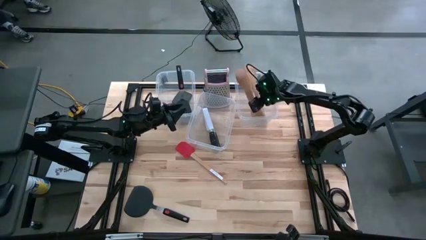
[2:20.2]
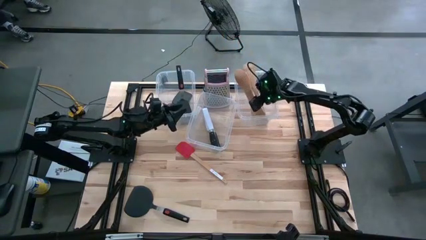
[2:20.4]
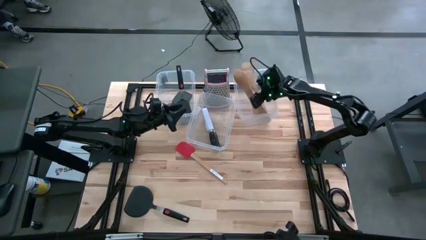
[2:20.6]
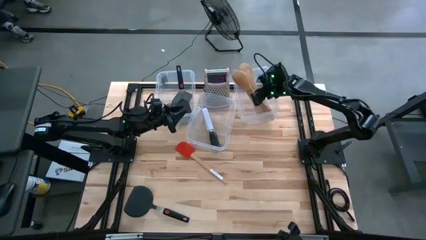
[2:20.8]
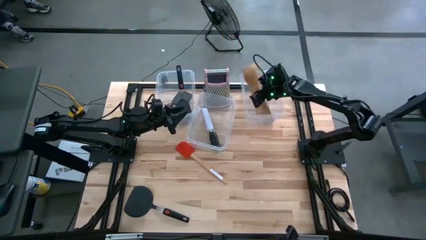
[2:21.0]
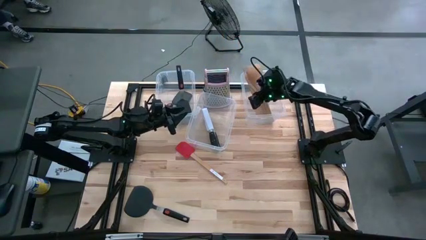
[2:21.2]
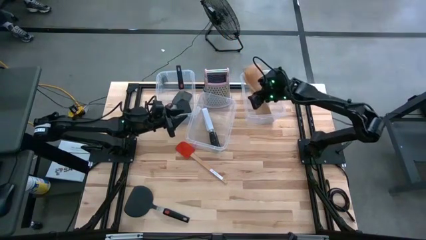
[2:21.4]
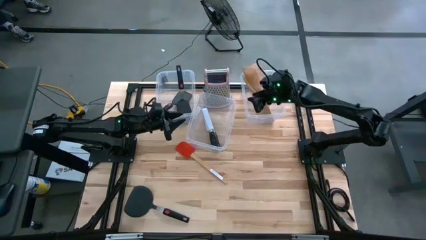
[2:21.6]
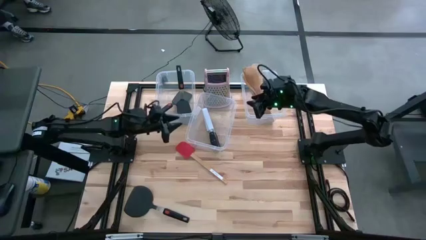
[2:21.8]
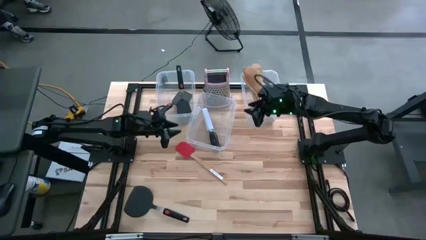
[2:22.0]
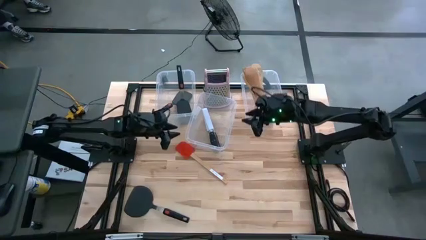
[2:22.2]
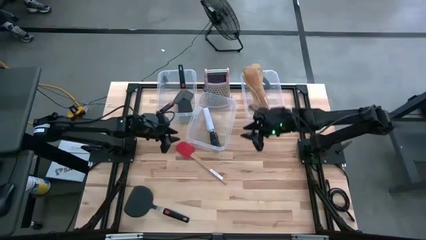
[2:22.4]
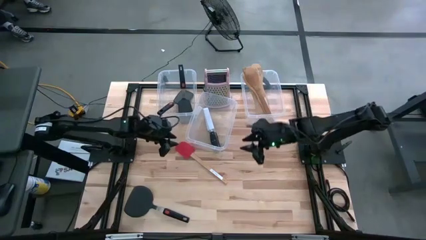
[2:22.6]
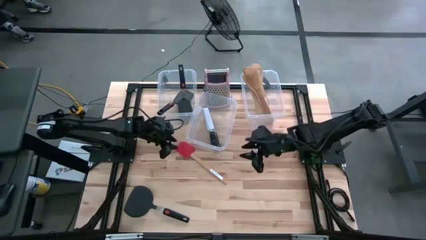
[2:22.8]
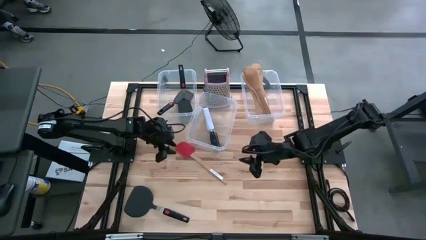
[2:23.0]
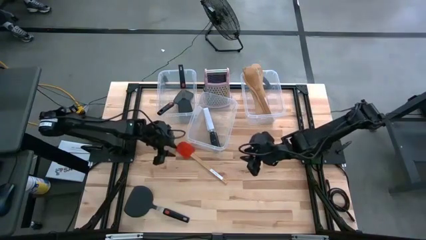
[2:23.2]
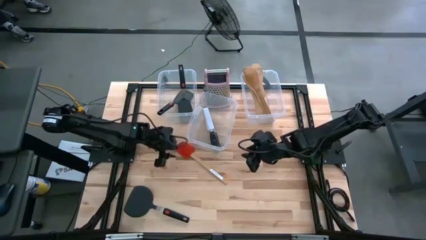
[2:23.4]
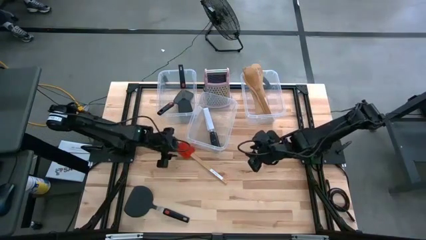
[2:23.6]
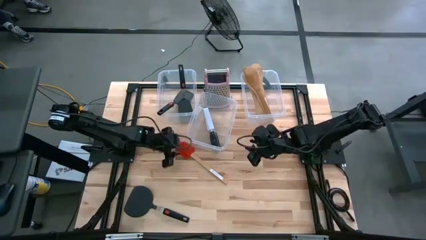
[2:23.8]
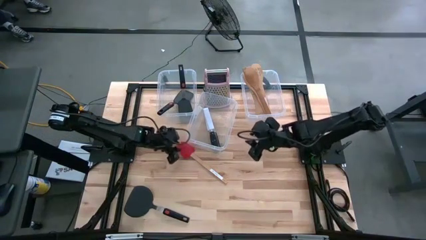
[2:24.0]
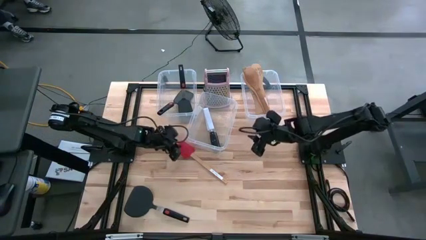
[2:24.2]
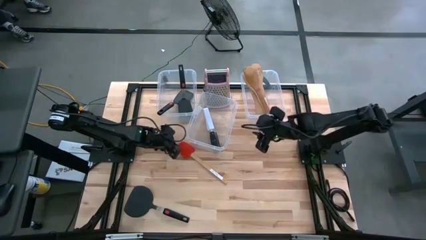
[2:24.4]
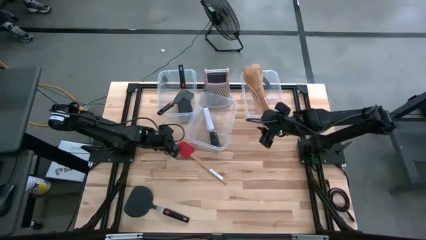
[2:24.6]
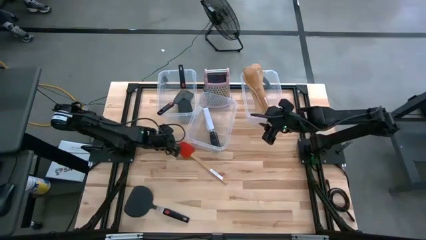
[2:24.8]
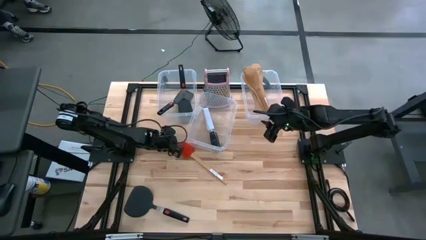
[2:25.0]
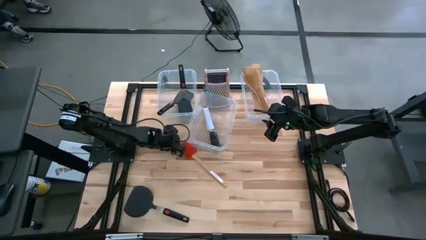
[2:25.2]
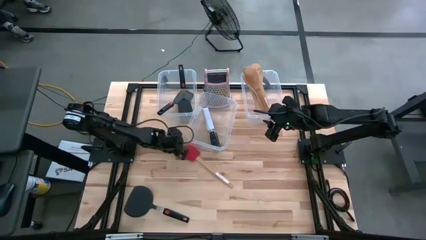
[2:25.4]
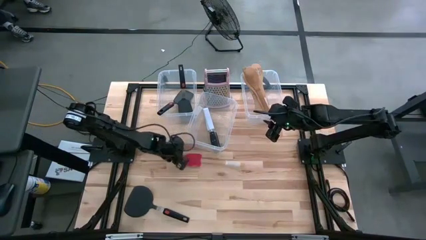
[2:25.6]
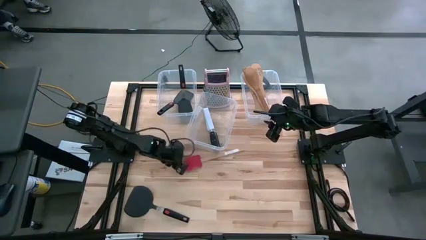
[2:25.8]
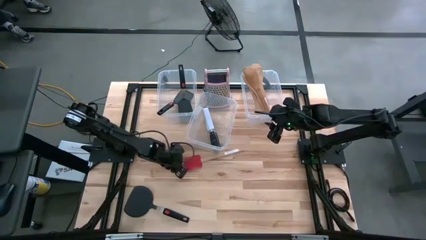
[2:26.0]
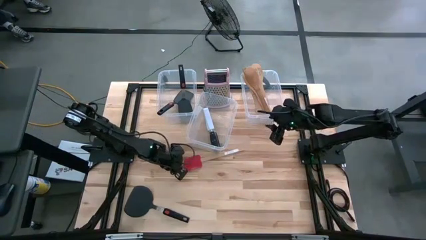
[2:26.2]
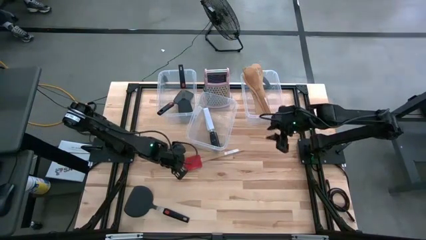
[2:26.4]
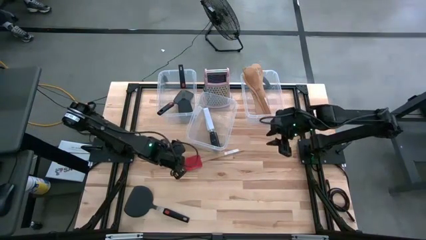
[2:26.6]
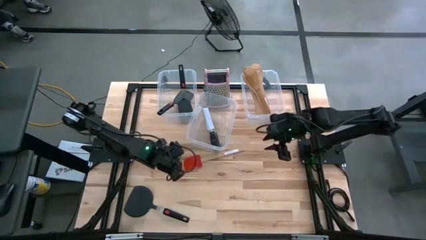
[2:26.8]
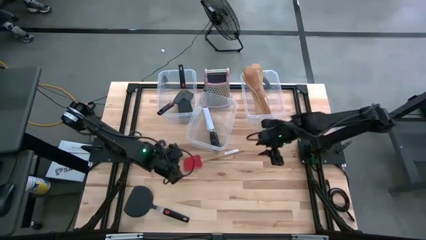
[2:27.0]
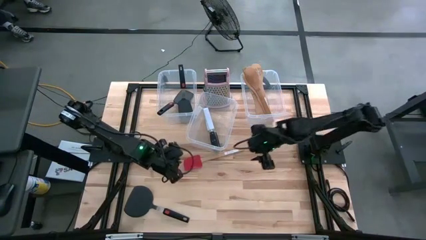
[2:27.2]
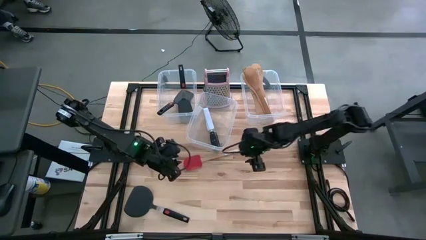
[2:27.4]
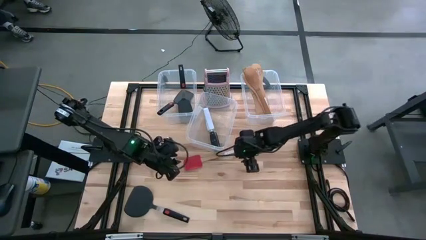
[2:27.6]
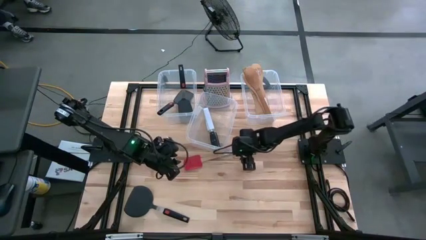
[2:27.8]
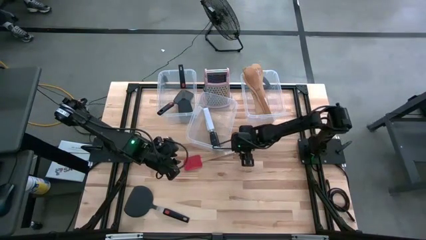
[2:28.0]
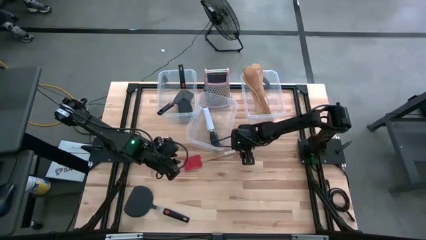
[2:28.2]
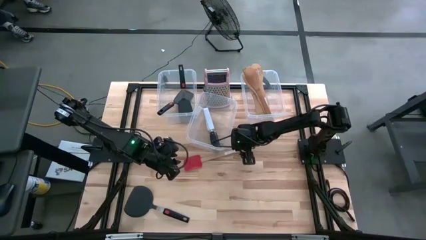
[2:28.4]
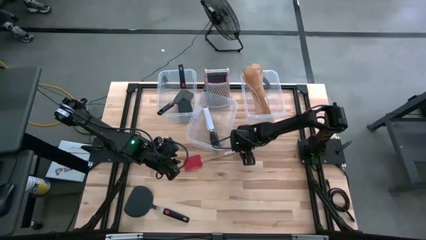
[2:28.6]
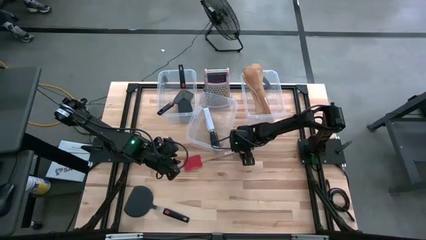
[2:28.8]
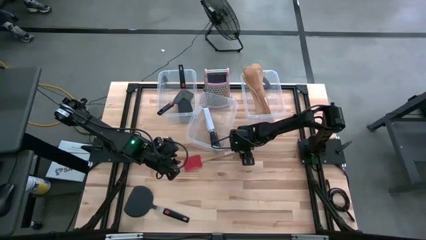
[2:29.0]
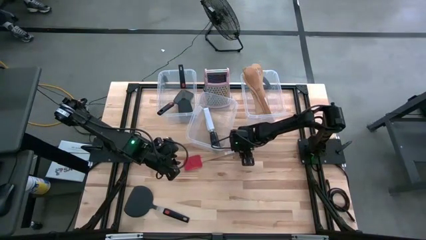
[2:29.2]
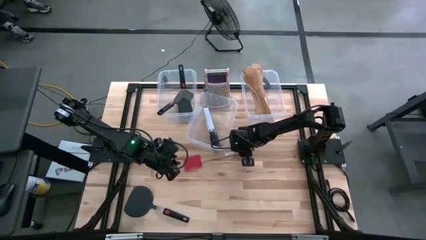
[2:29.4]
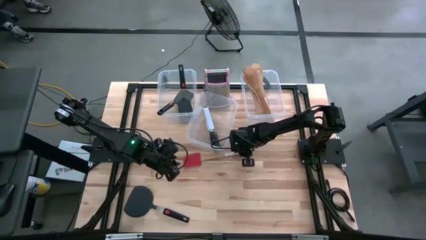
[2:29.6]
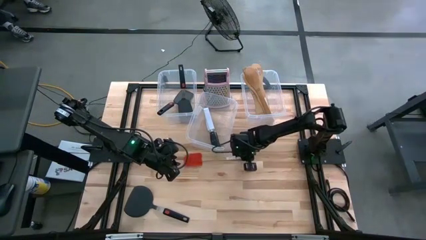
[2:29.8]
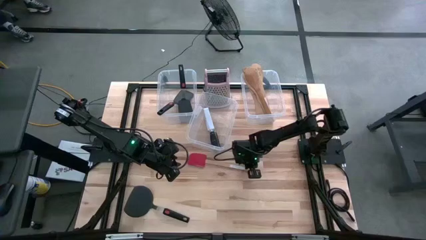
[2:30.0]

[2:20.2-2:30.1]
Task: Pick & Place Kitchen Items
Put the red spatula into the left transparent bin

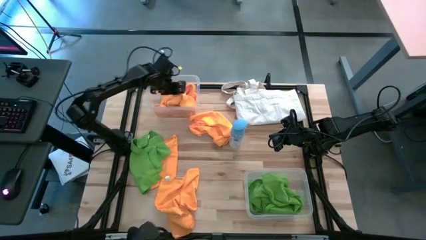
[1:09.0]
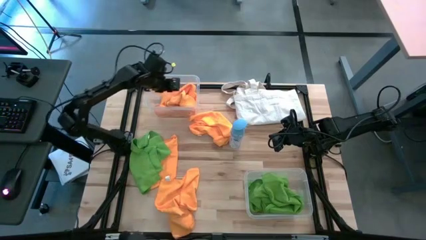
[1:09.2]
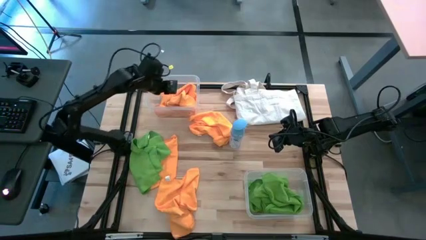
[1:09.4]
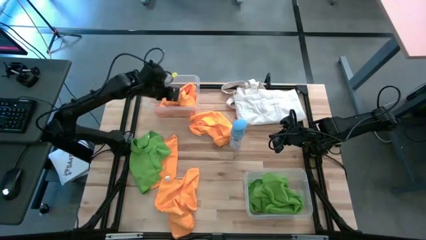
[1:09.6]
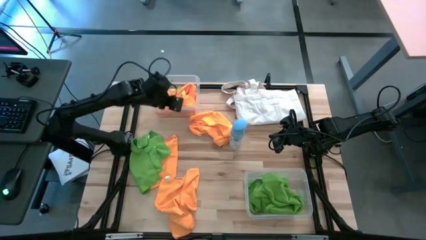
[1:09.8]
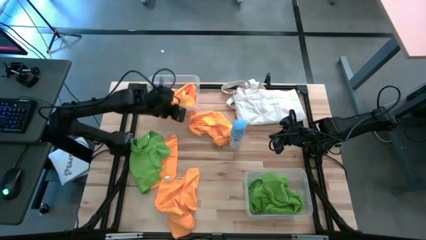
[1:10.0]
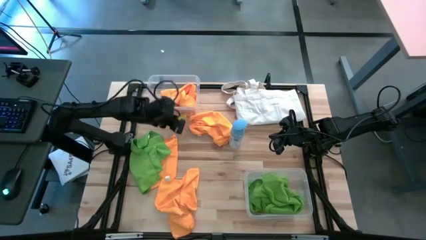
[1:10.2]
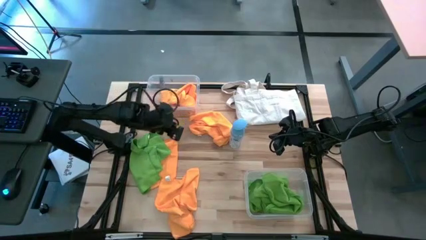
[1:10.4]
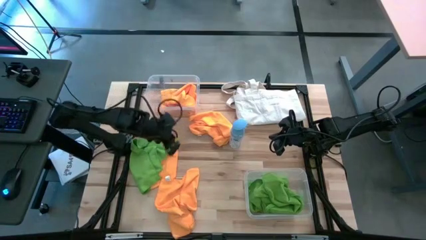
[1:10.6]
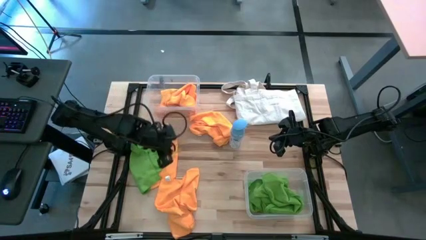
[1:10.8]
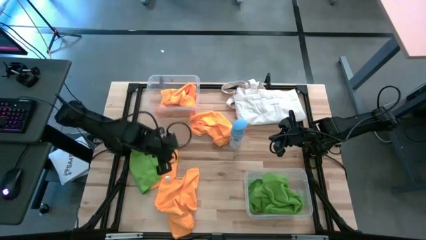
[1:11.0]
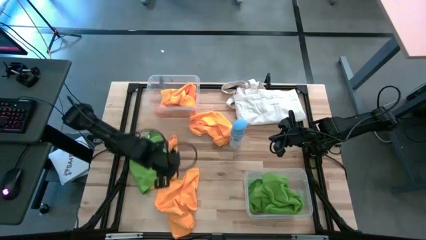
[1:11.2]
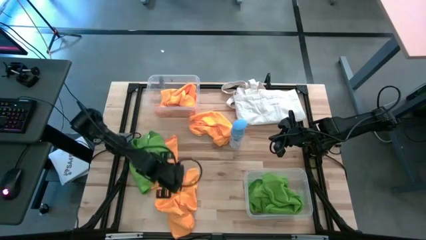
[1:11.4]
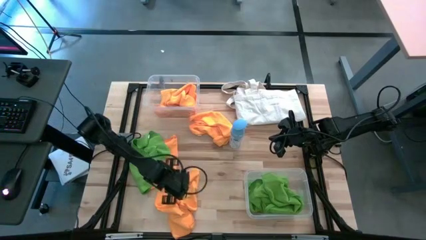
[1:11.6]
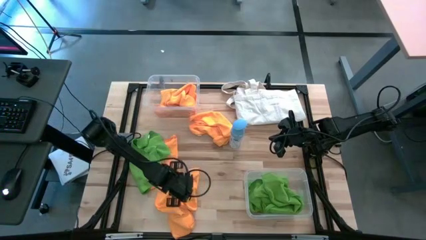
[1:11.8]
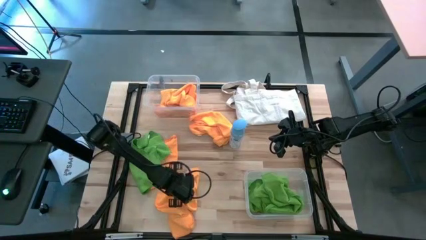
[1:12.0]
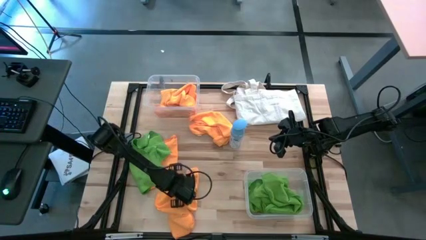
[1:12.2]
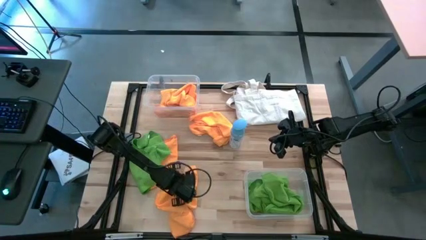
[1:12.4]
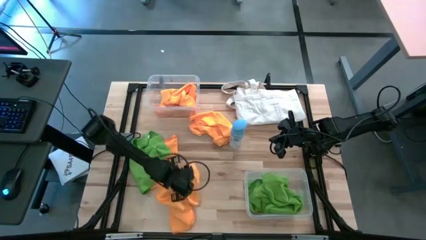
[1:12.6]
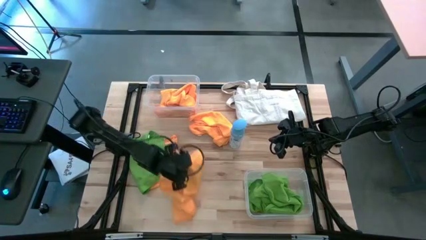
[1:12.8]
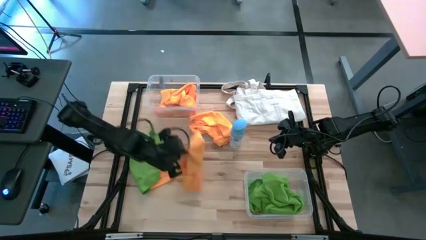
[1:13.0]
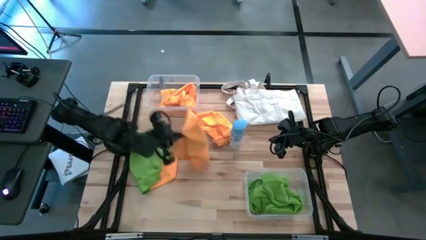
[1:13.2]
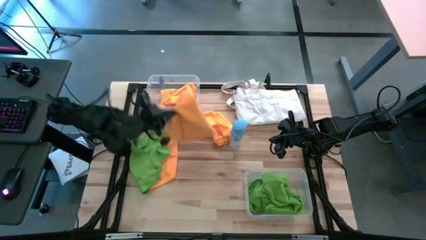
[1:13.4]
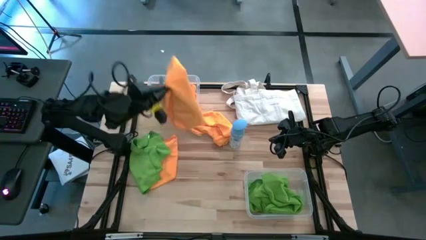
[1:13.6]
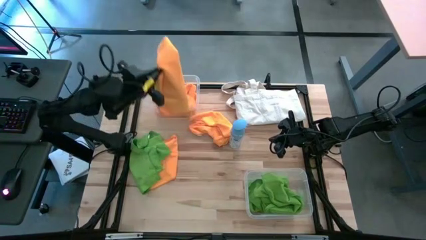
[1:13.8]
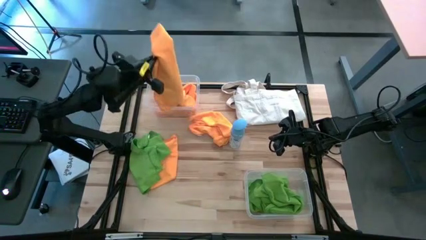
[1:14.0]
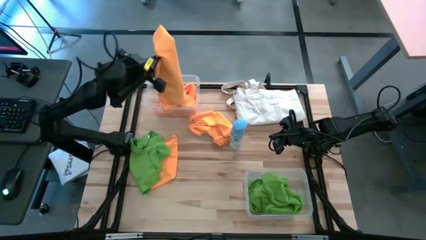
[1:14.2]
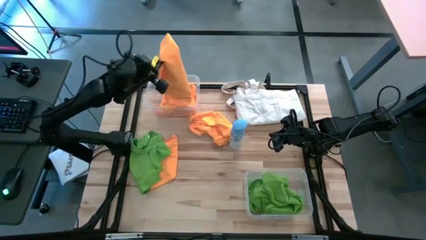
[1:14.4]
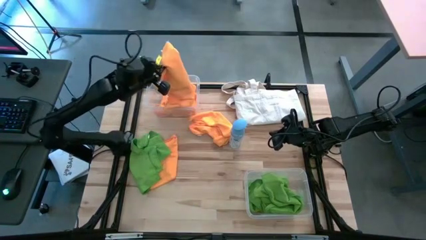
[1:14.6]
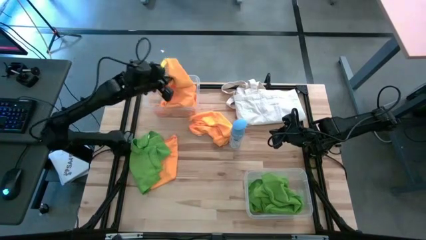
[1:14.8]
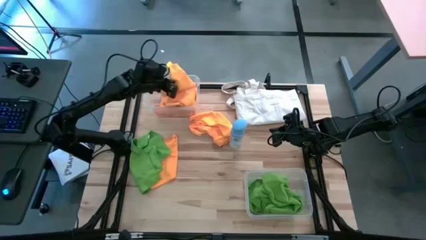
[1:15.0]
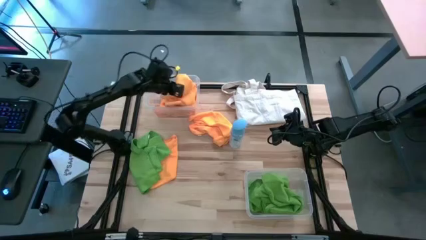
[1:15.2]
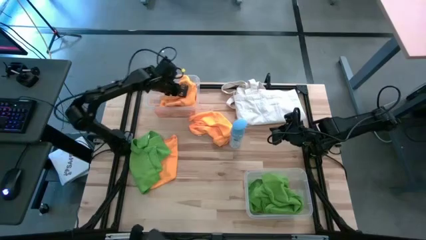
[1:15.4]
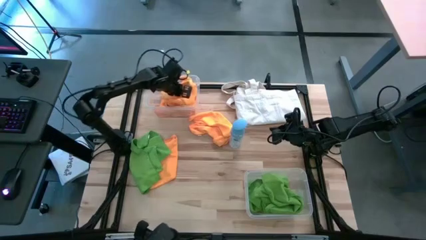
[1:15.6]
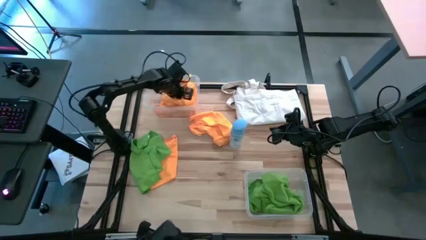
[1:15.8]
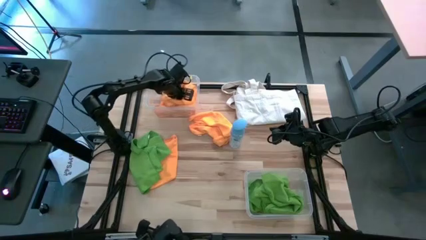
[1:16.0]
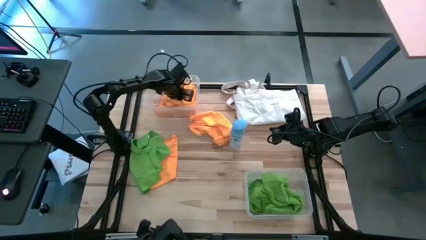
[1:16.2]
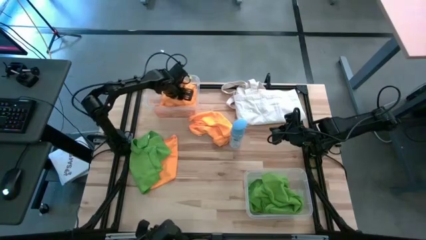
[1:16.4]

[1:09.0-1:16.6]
Task: Sort microfiber towel by color & place in baskets
Put the yellow microfiber towel into the top transparent bin
